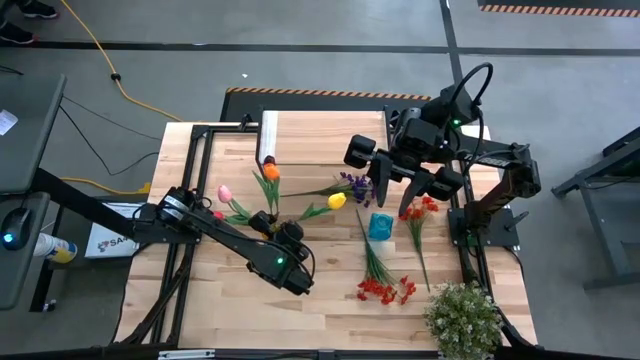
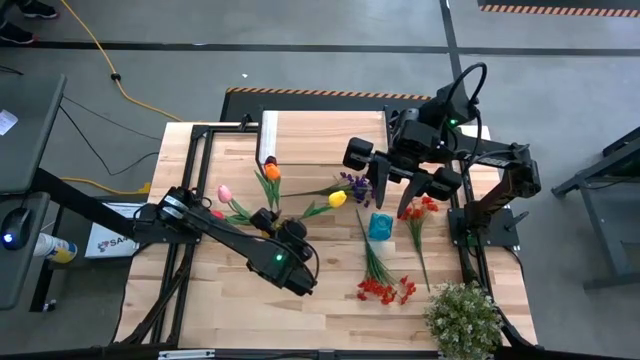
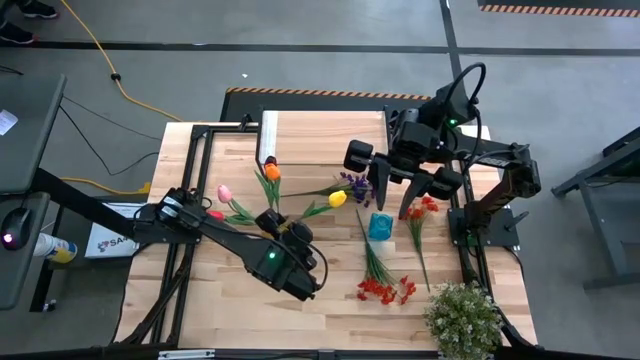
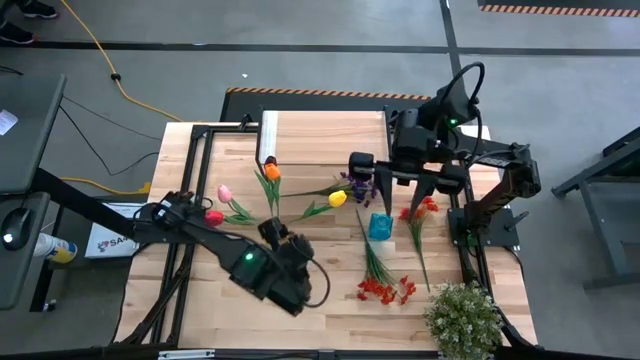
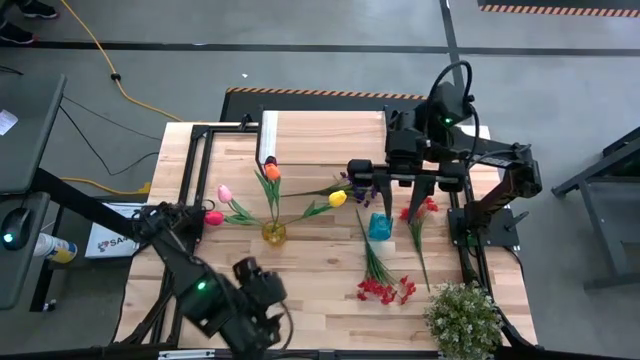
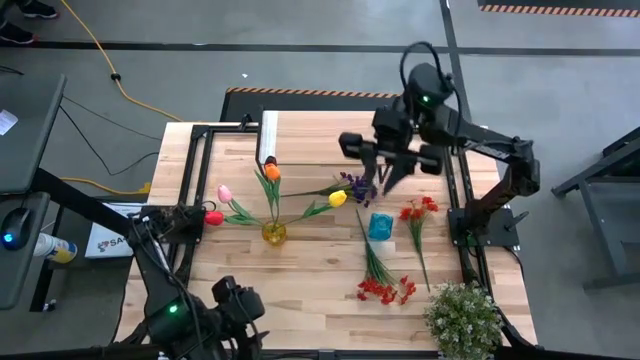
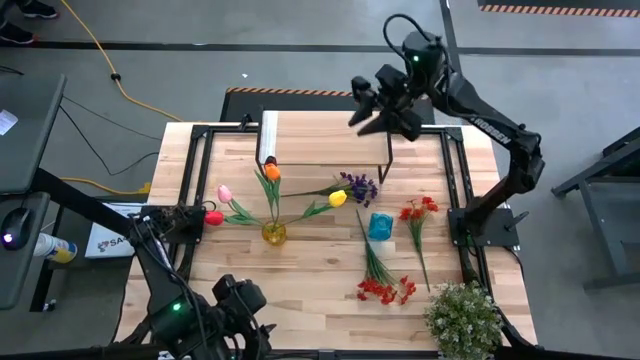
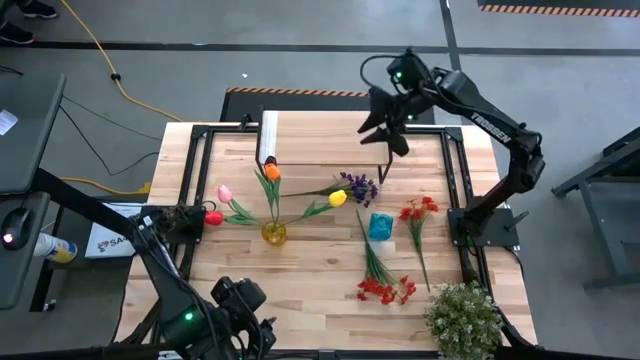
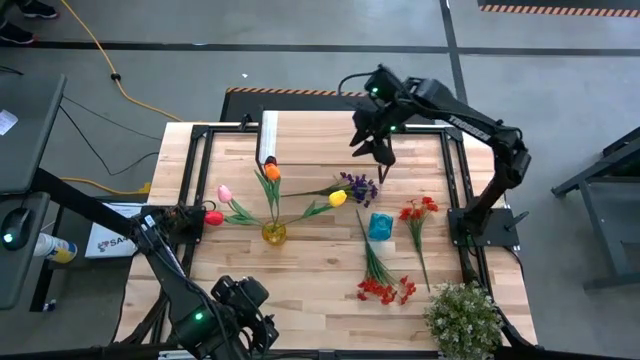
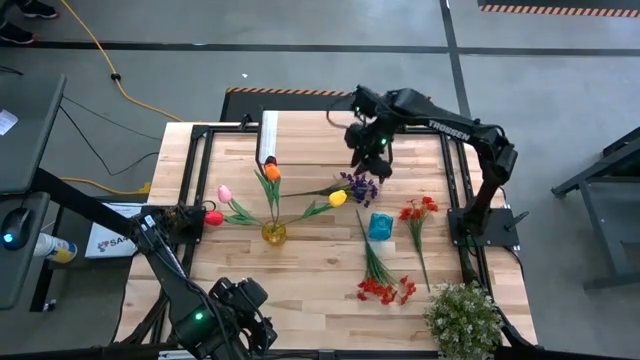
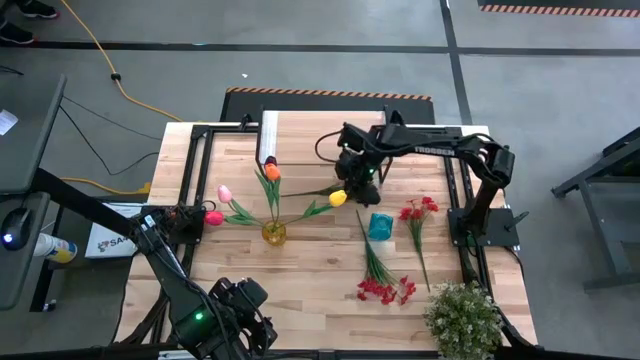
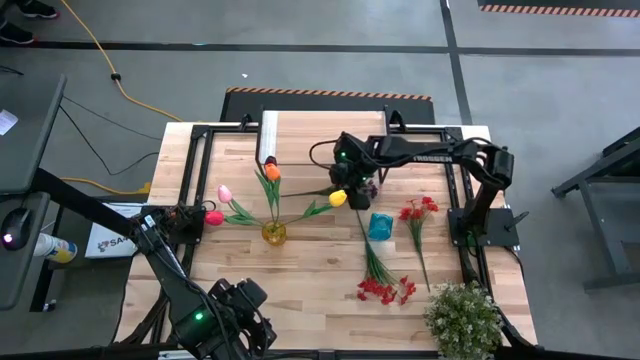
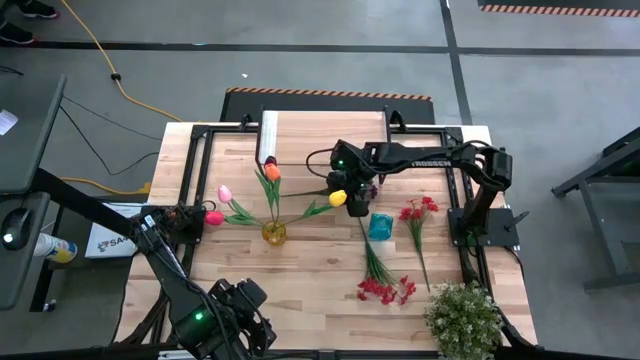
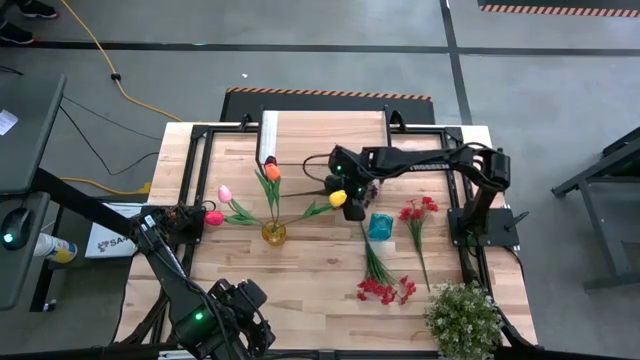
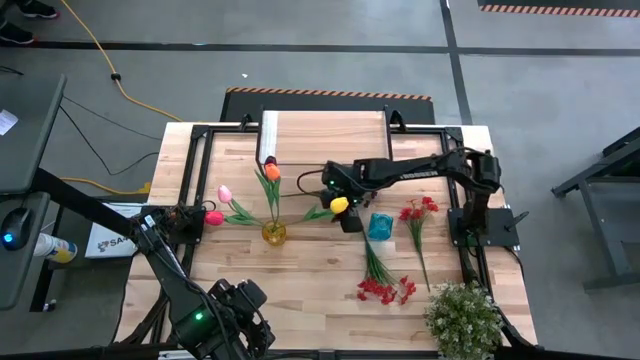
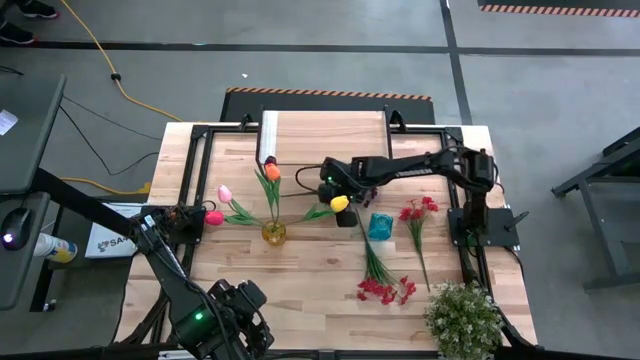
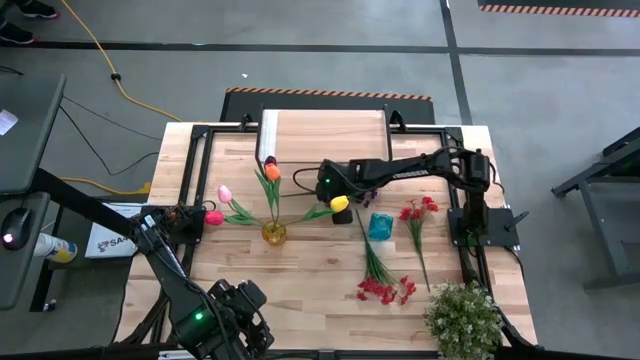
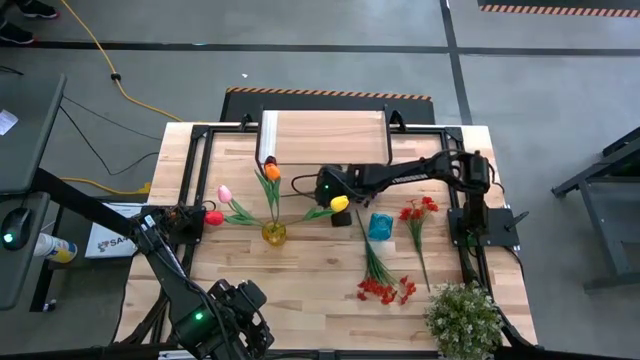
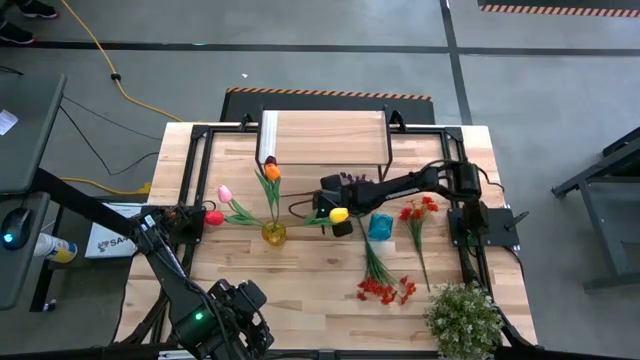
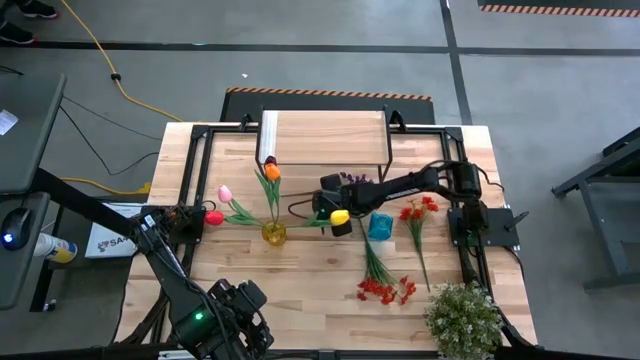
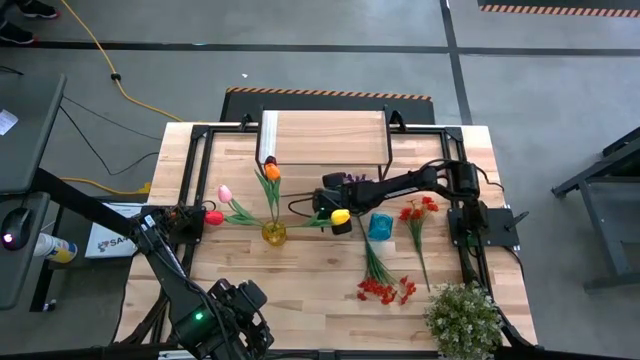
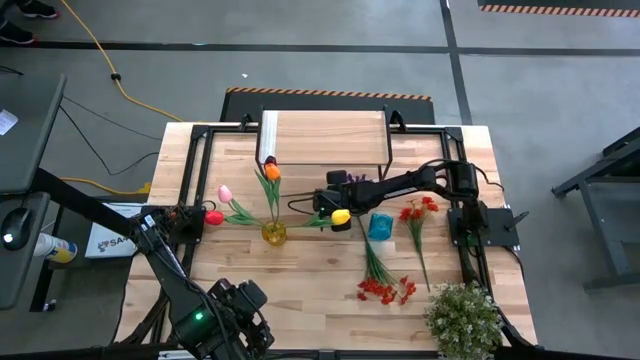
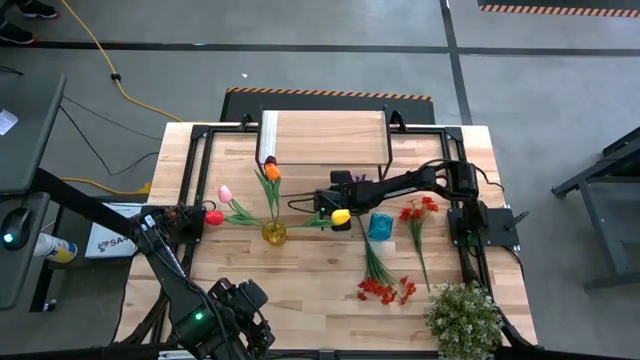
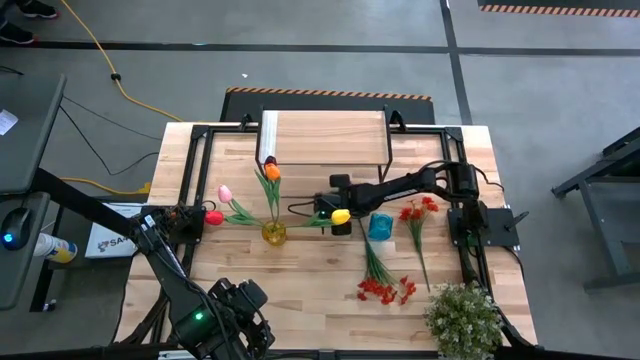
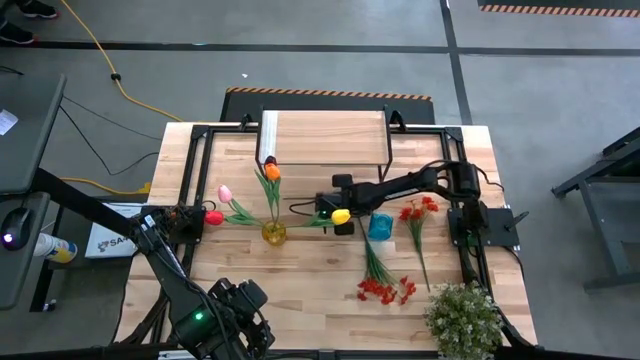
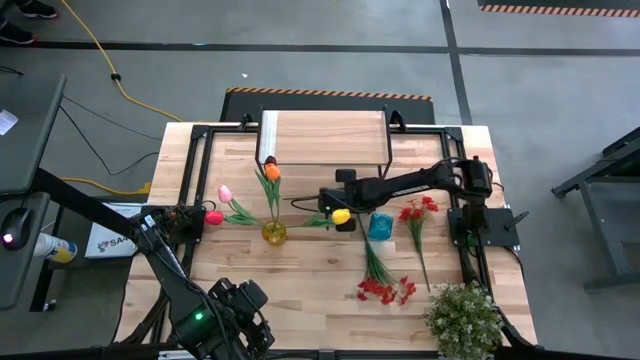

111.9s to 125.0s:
Task: Pick and place flowers into a vace then onto a shelf
Put the purple flowers into the blue vase

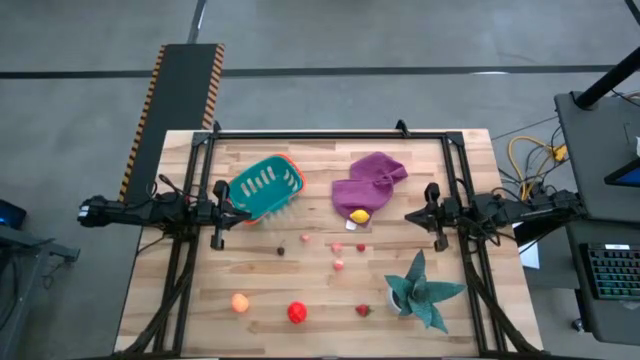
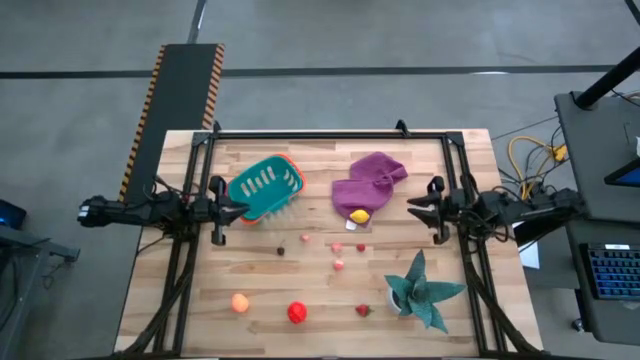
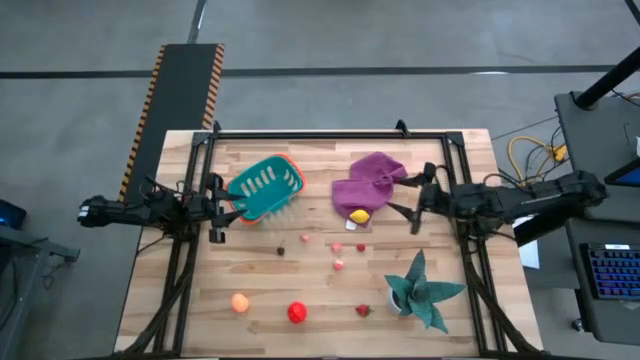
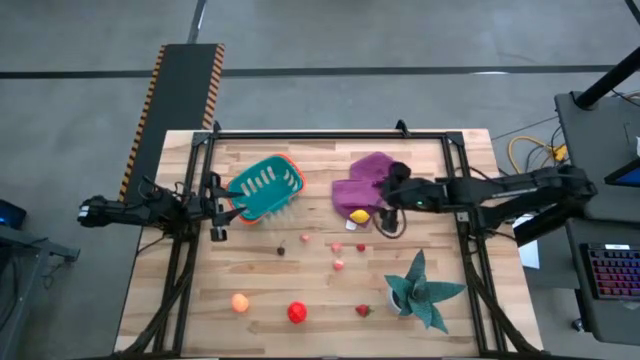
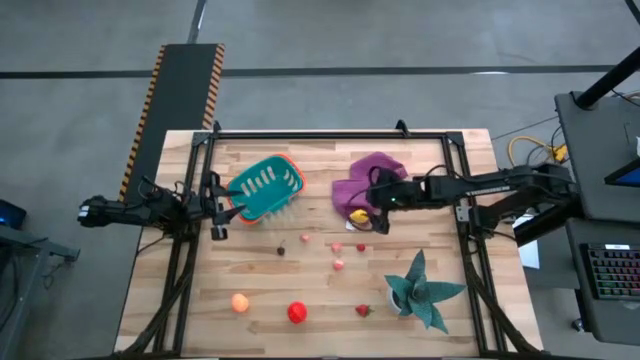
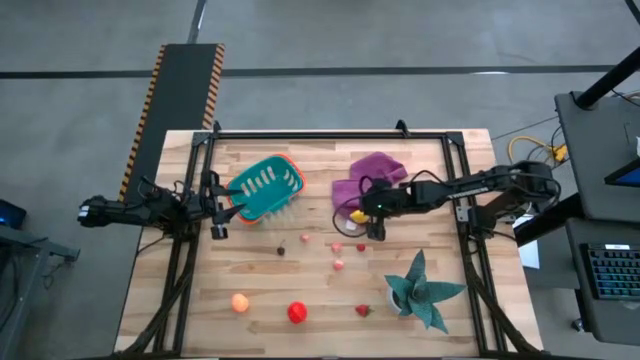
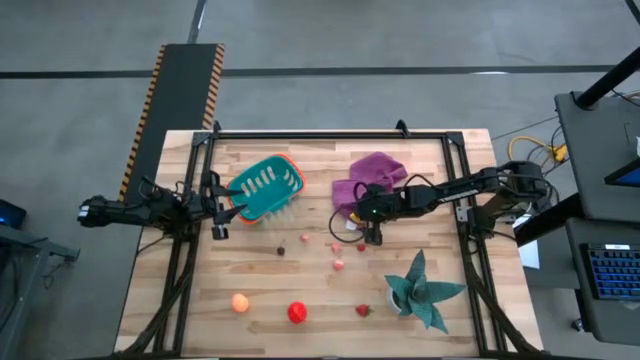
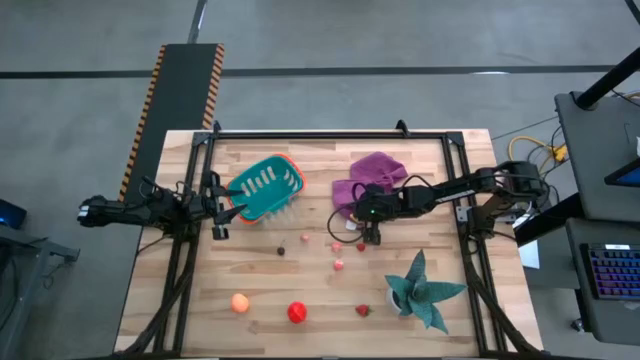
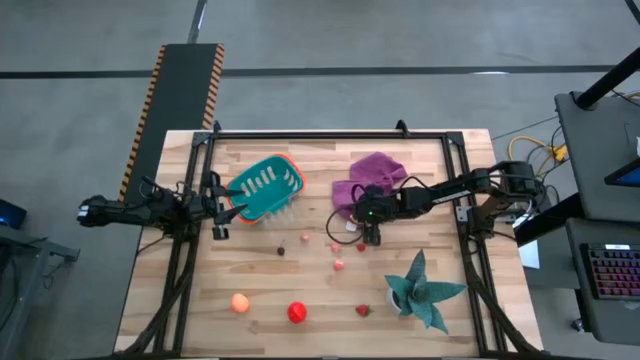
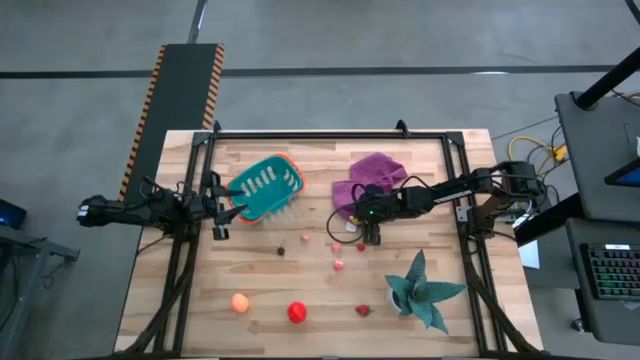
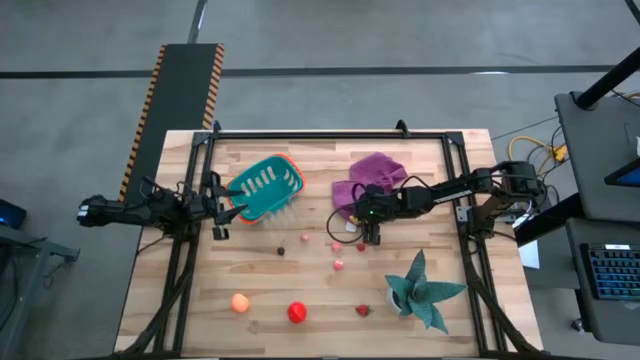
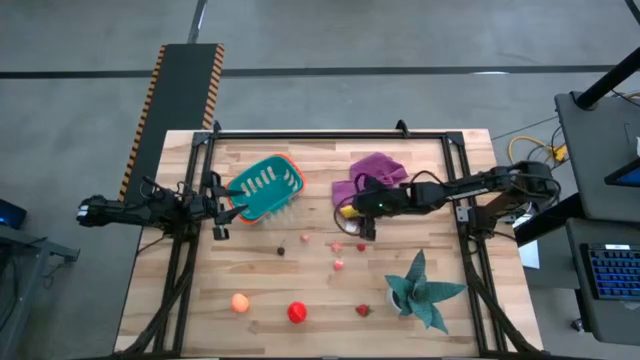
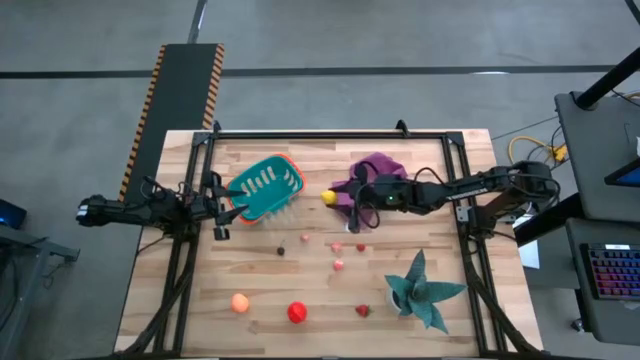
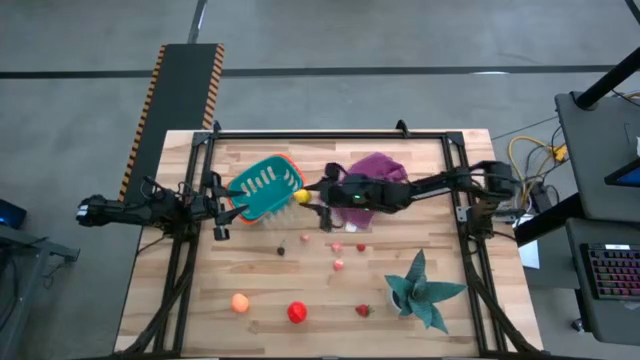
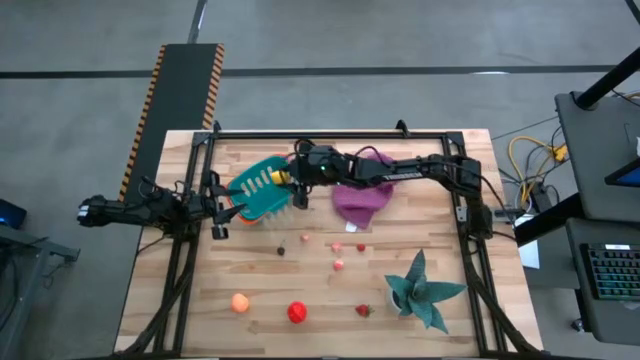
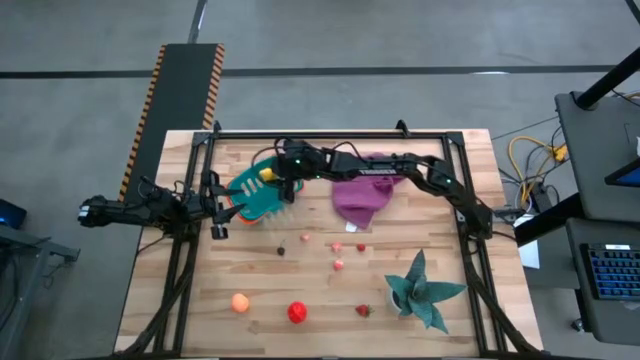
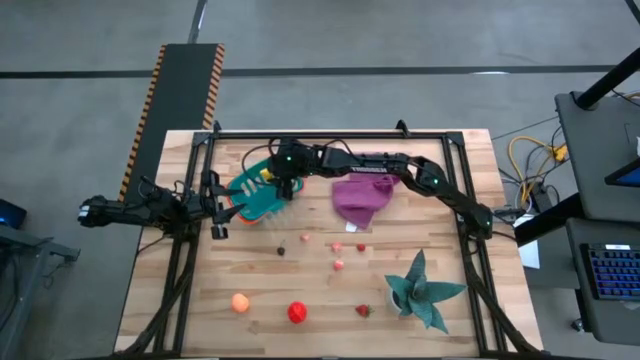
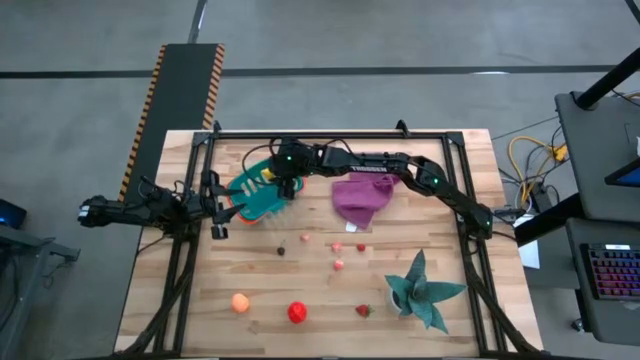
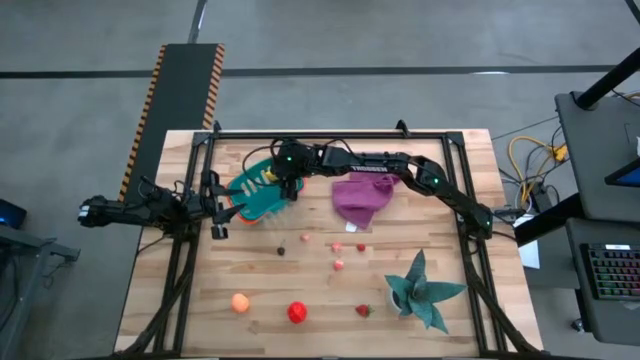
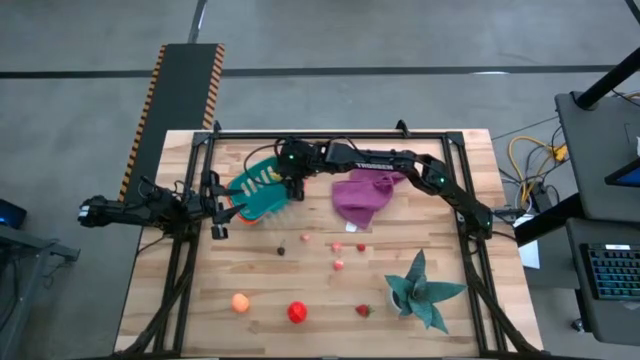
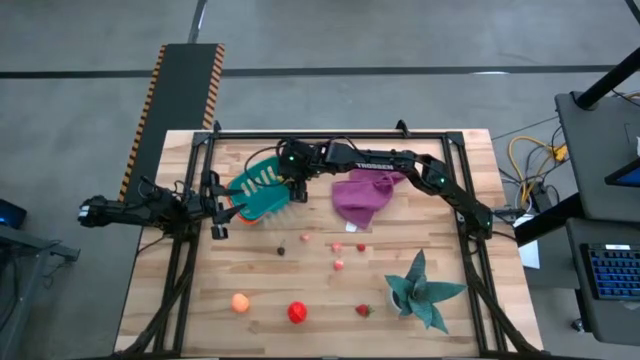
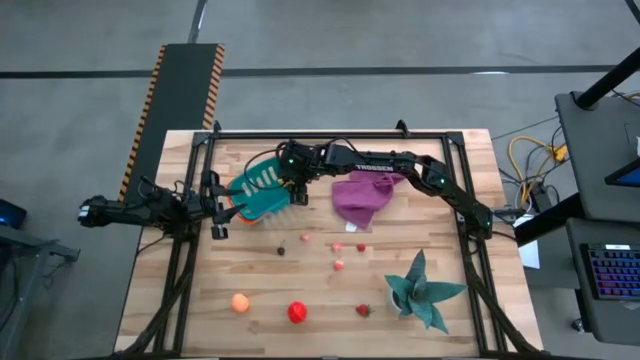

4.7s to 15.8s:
Task: Pick and placing Produce into tupperware
Put the yellow lemon into the blue basket
